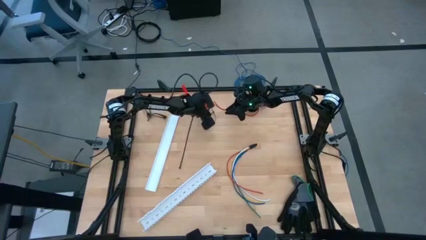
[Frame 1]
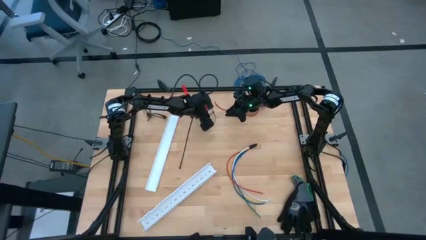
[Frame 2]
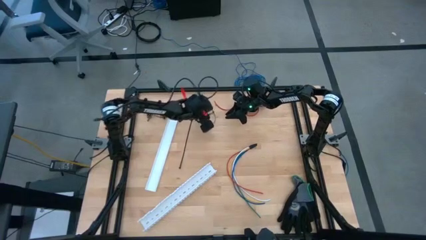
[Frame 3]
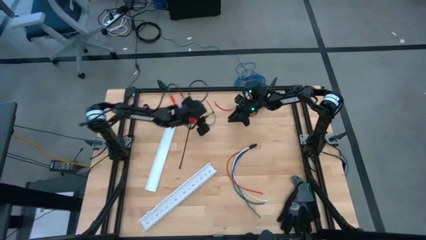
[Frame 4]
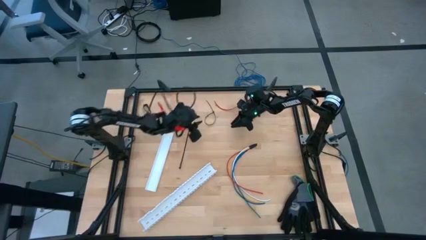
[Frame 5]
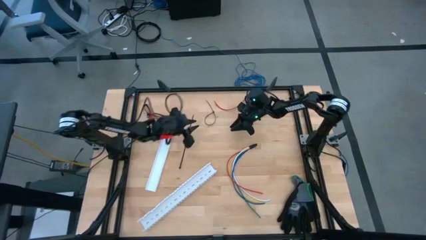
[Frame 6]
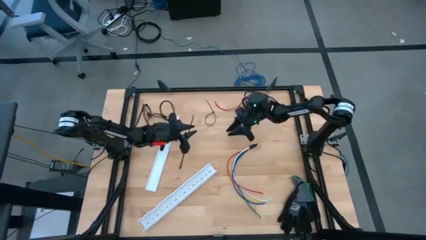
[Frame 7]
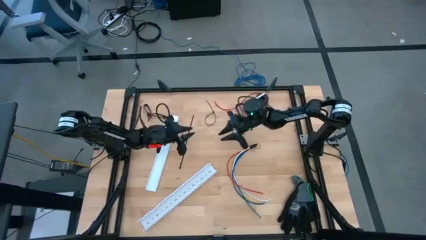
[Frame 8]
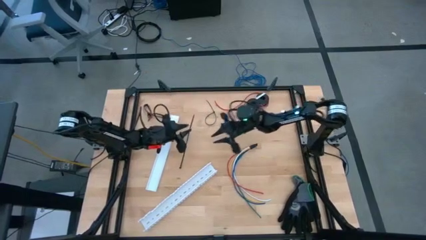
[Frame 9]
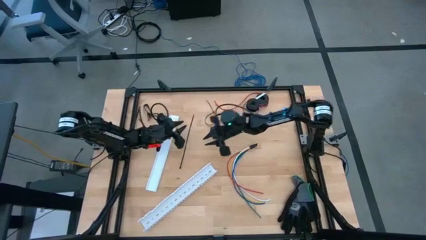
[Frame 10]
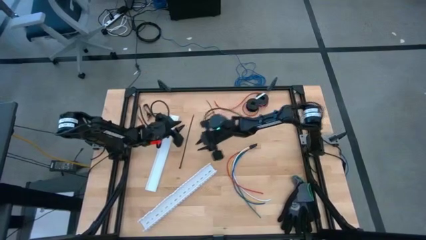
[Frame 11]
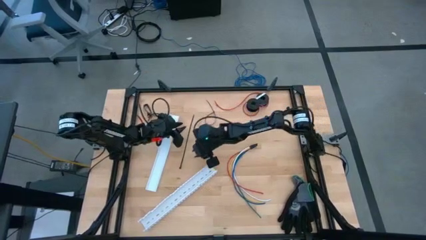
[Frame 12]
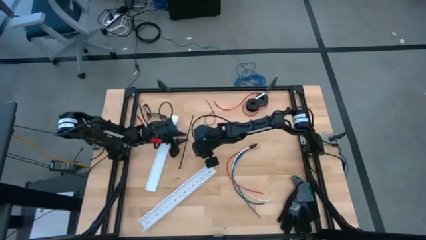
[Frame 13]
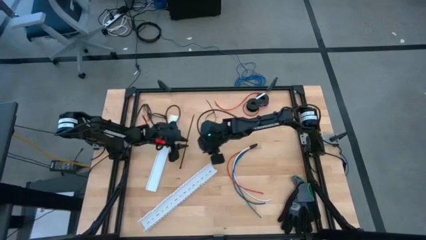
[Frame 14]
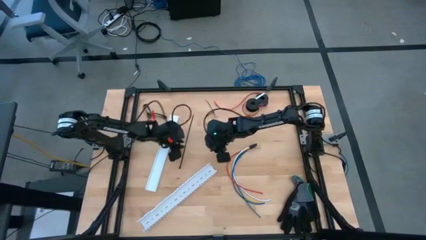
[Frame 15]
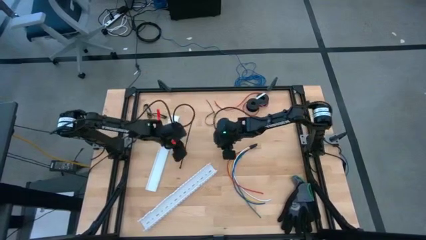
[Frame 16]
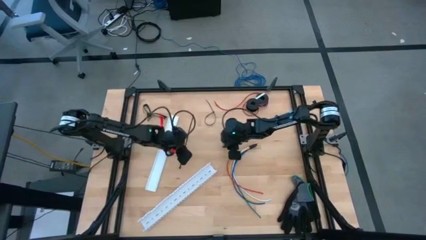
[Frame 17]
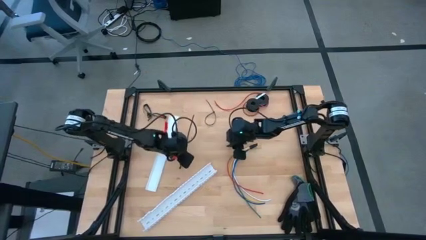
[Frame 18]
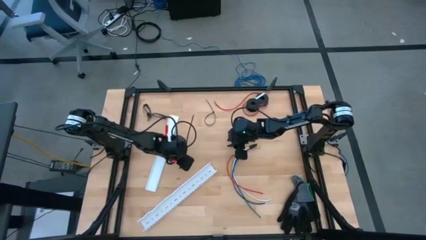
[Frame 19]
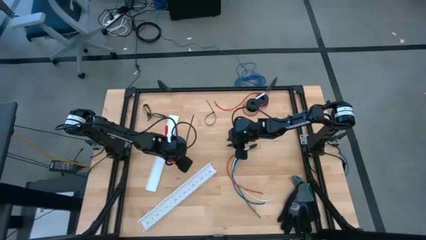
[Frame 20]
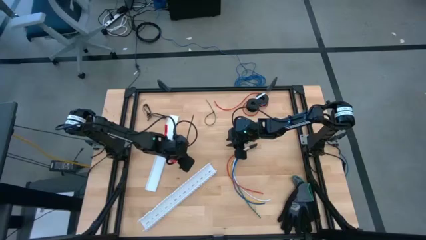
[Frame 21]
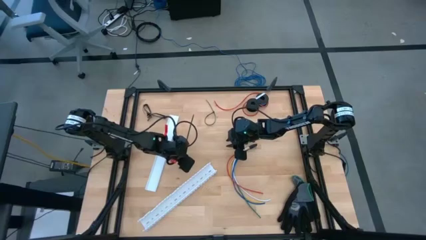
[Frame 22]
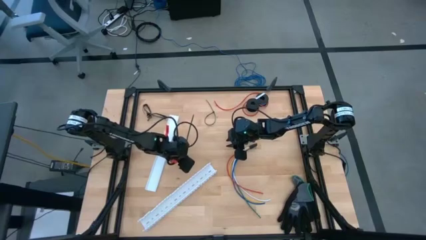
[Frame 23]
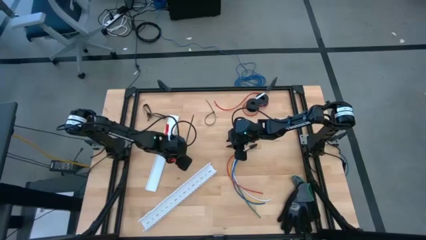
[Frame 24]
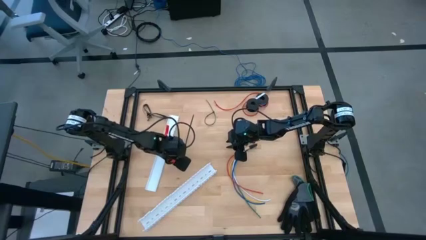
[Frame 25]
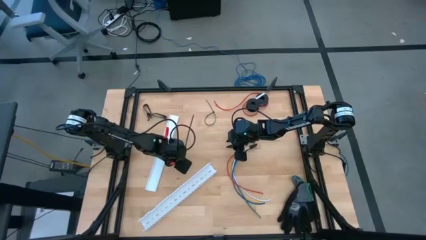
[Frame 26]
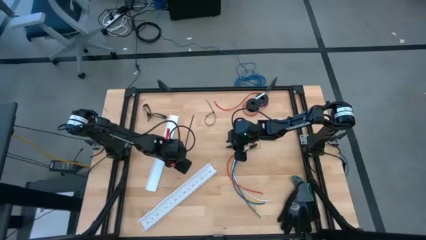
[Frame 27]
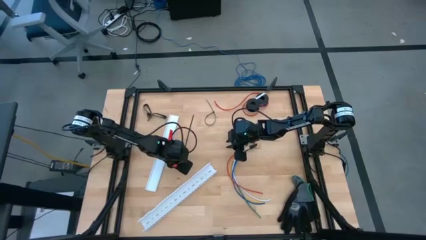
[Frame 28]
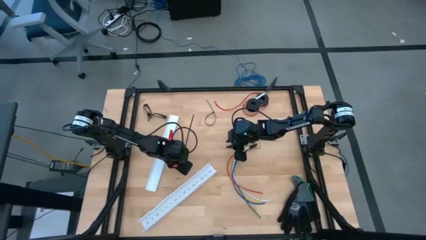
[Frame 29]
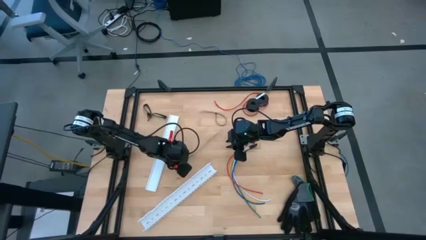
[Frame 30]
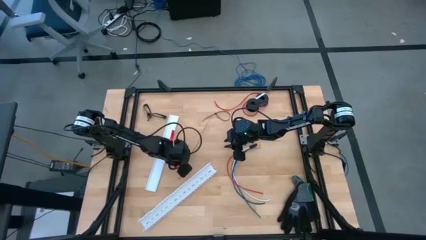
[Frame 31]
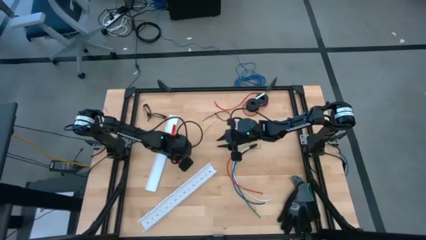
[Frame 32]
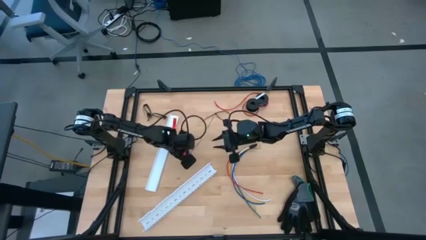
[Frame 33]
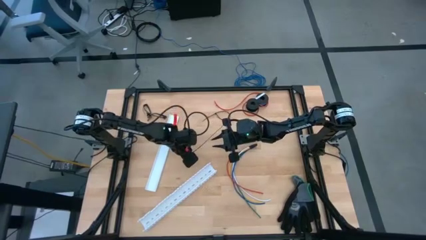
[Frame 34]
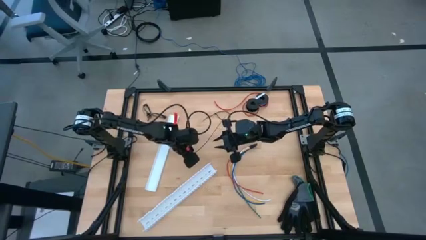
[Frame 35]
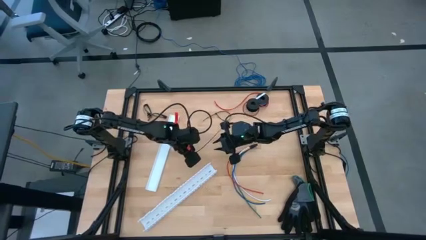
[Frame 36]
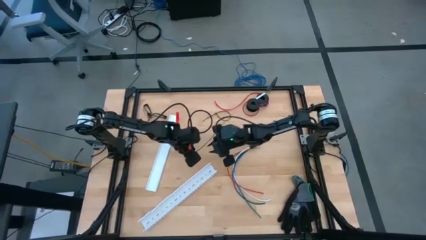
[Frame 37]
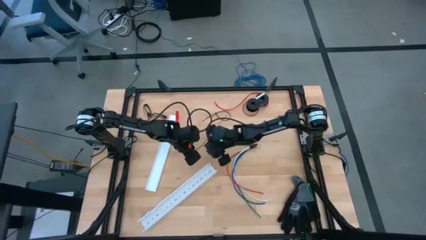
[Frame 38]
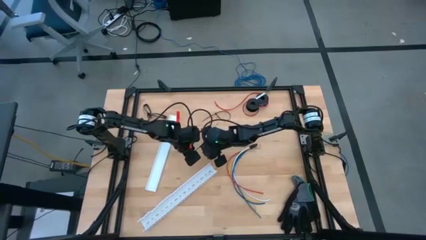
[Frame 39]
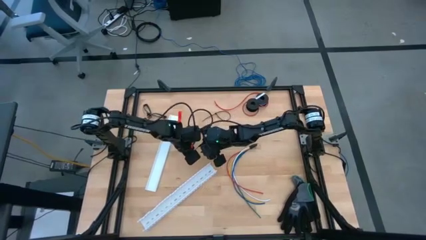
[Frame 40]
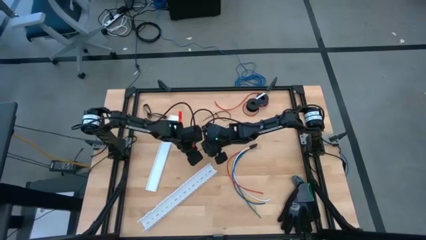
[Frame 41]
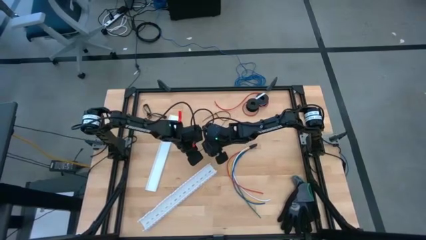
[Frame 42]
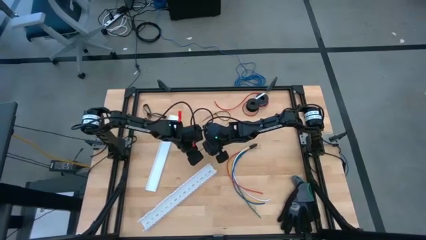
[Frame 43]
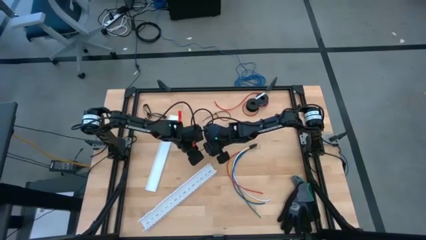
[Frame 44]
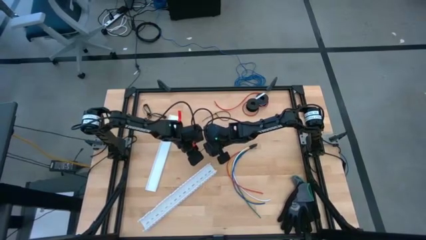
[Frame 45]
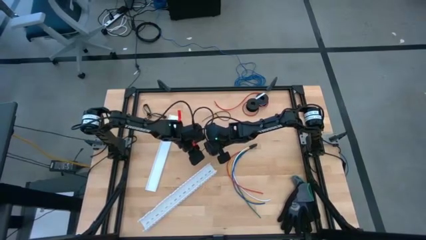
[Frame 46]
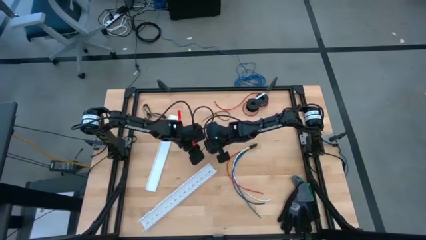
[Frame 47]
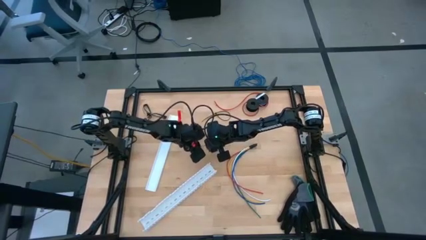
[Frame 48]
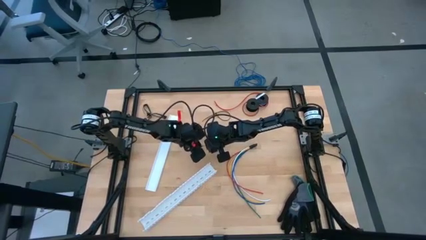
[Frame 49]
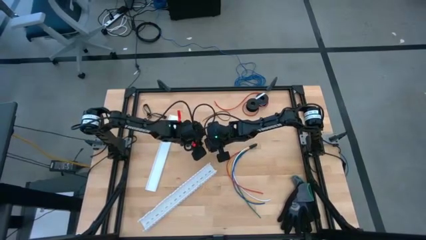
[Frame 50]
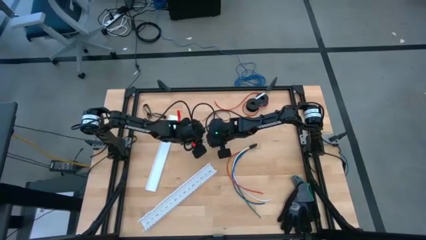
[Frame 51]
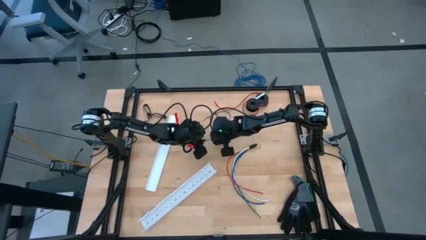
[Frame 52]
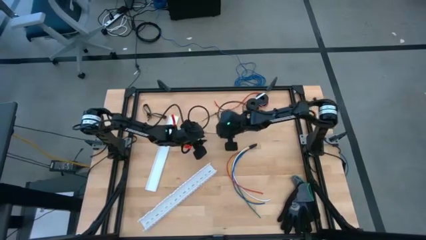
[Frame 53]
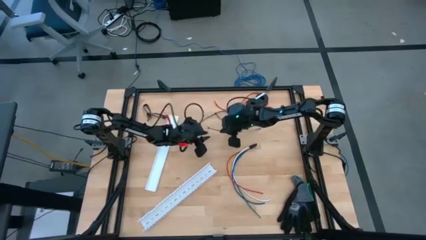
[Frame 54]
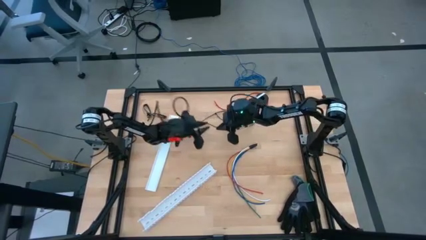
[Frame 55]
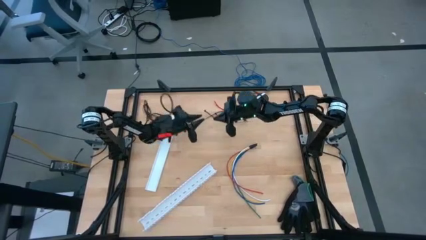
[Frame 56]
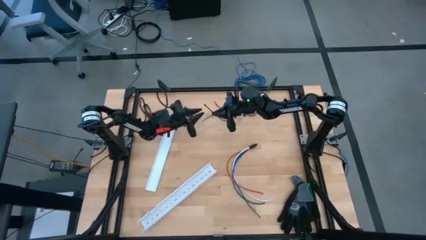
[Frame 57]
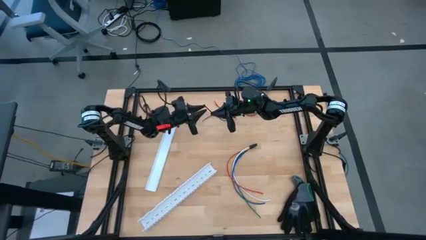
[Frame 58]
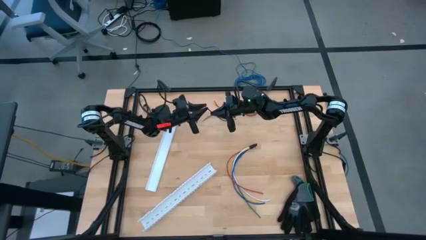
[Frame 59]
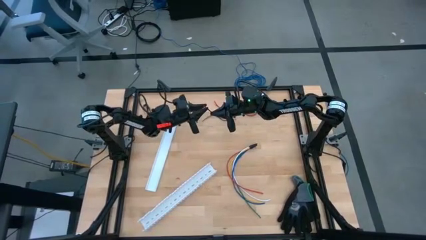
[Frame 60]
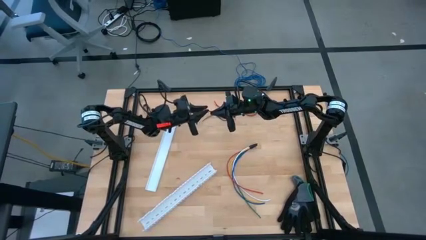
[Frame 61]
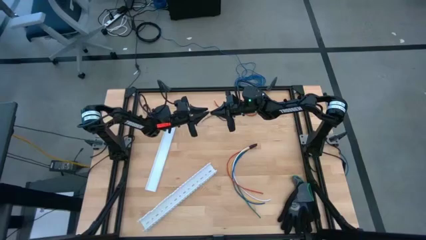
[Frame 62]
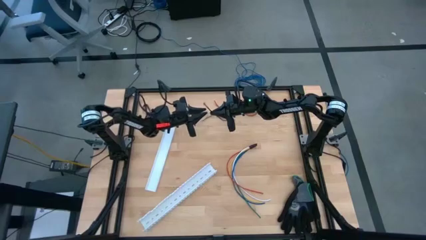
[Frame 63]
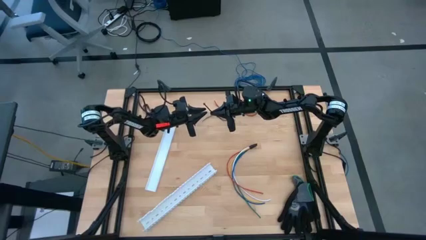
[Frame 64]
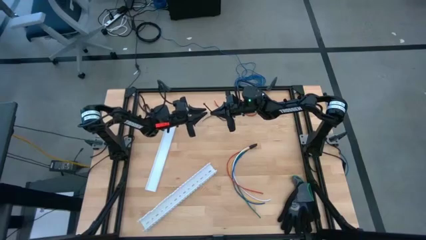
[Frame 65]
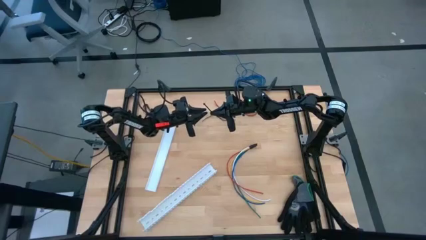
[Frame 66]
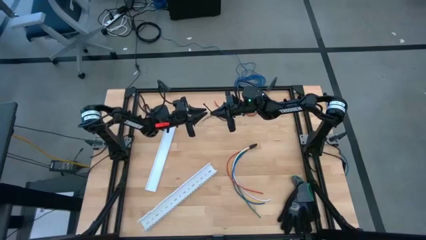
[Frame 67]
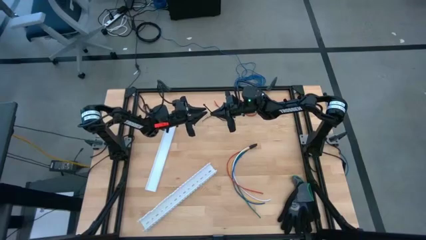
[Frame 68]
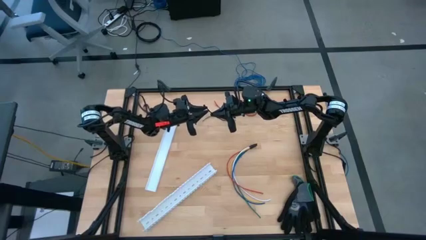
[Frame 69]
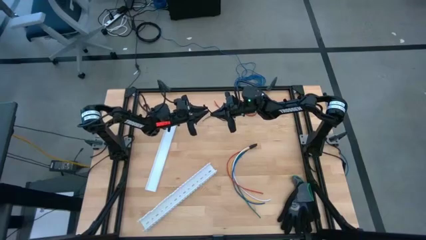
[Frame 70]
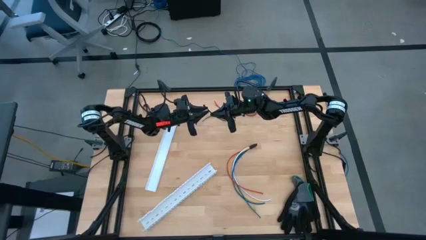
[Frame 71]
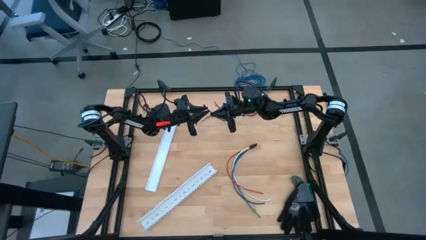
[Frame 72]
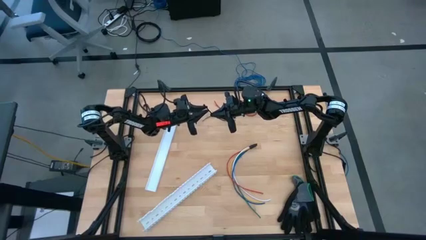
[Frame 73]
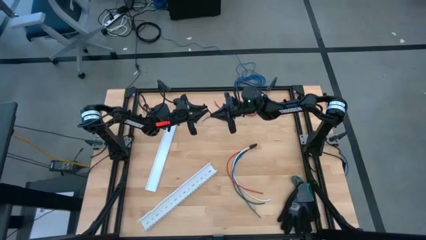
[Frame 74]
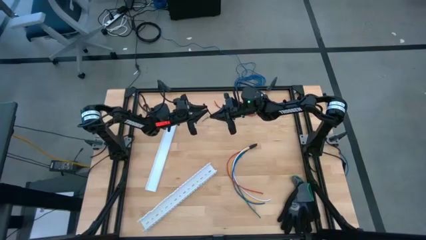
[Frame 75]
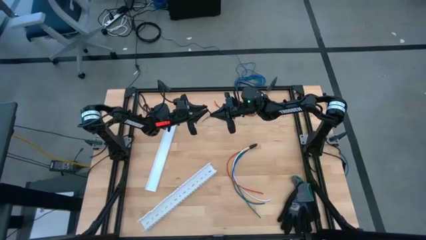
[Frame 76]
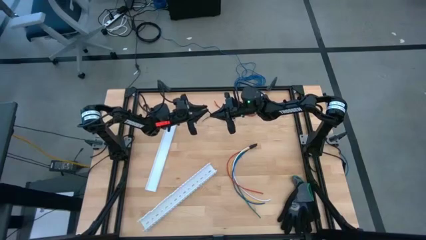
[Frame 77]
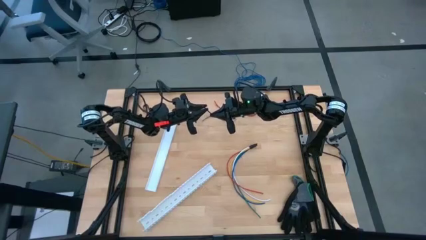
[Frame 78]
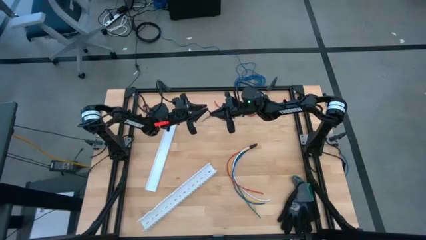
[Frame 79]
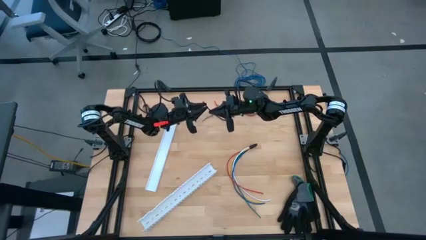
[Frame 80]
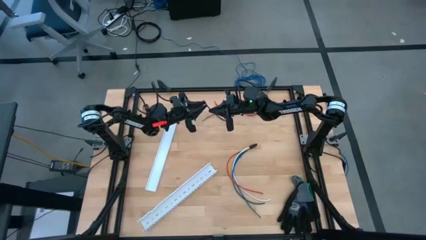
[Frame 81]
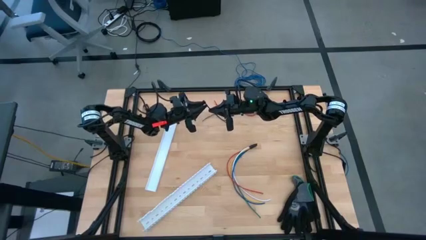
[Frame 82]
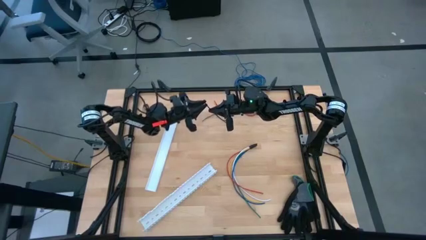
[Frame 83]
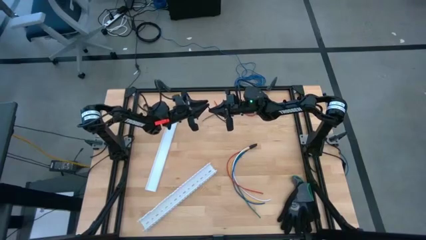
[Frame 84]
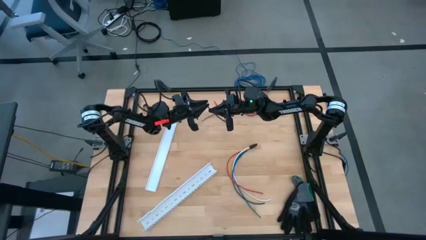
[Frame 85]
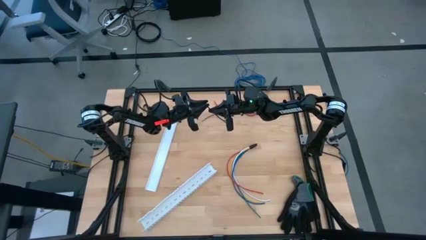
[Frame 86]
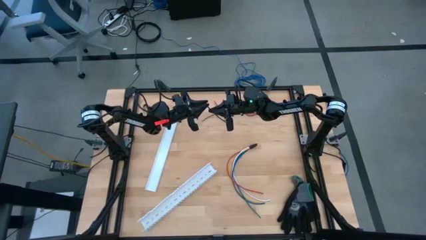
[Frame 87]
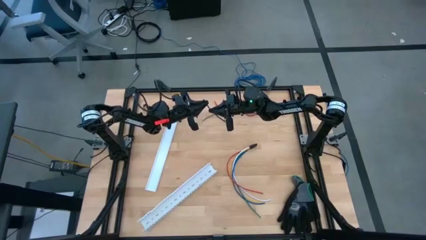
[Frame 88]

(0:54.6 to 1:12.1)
Task: Ziptie cables
Wrap the left black zip tie
